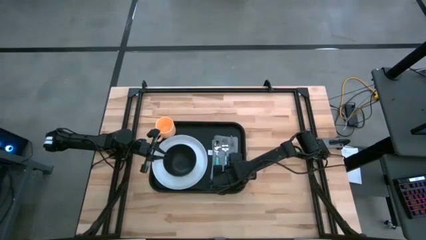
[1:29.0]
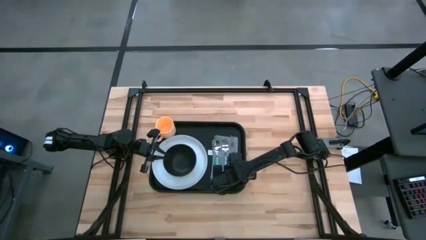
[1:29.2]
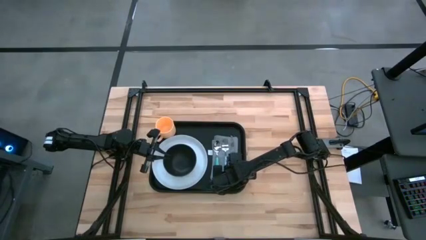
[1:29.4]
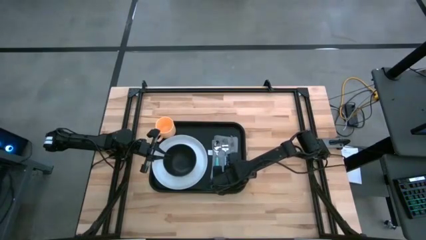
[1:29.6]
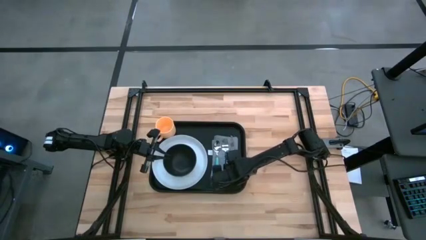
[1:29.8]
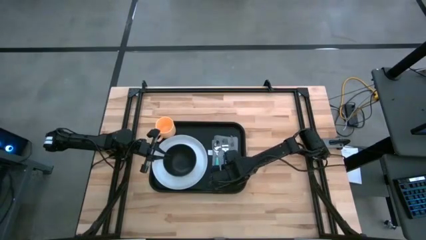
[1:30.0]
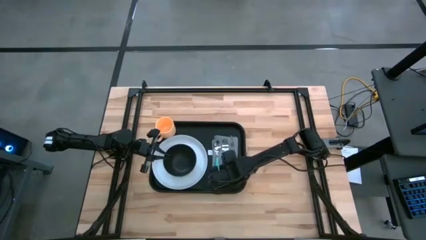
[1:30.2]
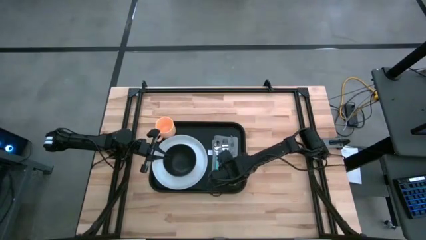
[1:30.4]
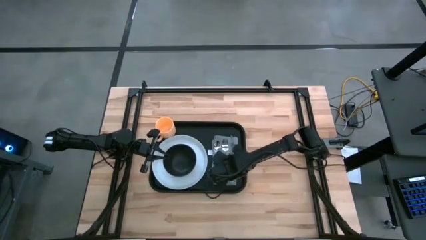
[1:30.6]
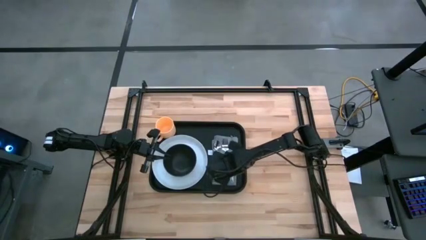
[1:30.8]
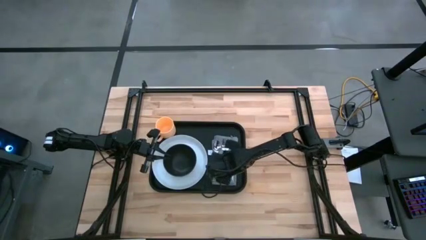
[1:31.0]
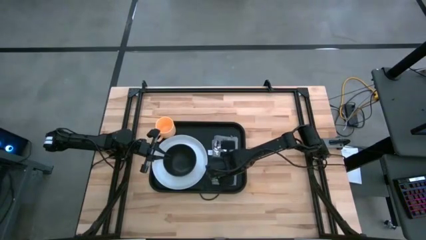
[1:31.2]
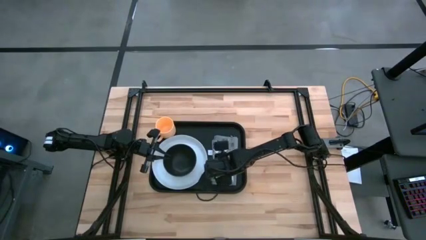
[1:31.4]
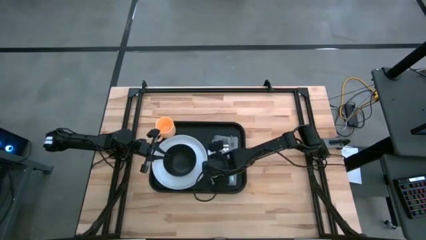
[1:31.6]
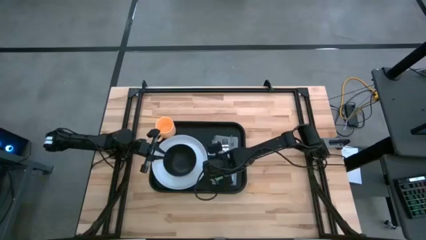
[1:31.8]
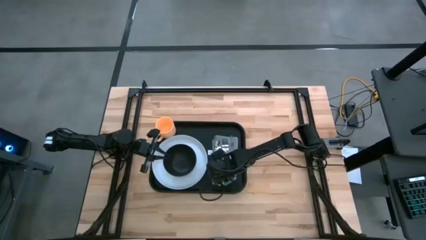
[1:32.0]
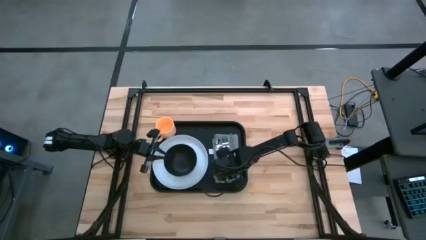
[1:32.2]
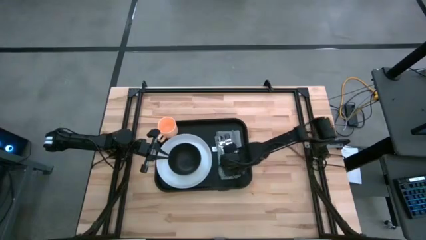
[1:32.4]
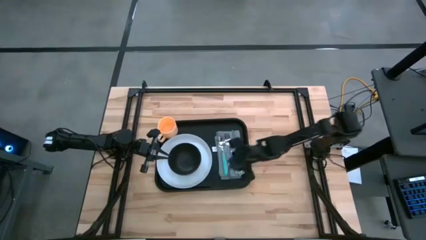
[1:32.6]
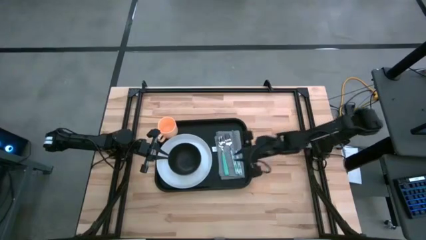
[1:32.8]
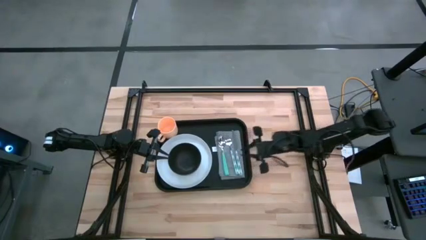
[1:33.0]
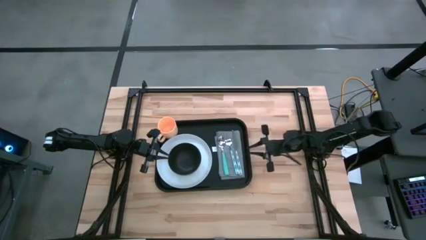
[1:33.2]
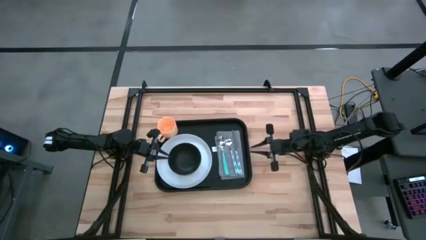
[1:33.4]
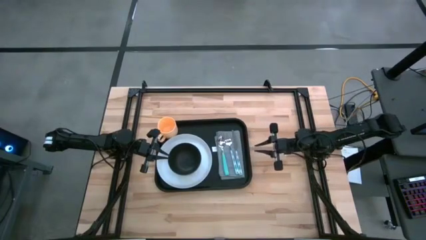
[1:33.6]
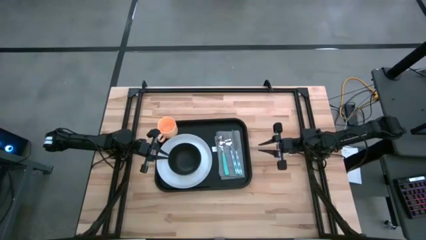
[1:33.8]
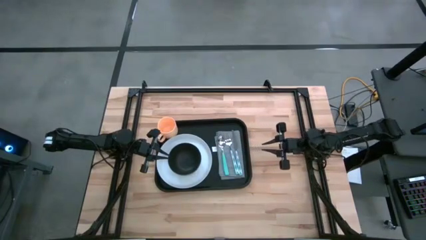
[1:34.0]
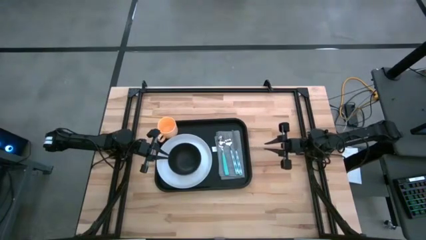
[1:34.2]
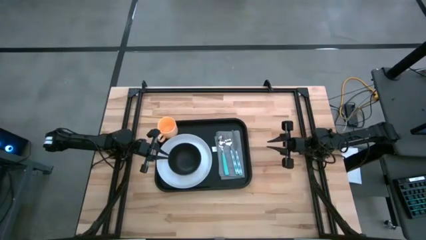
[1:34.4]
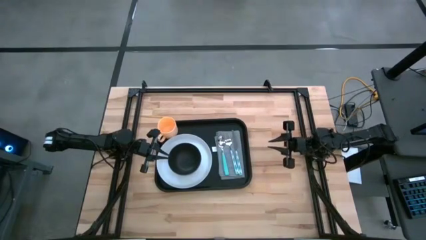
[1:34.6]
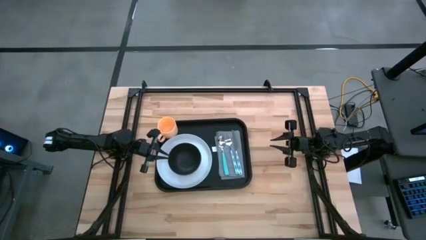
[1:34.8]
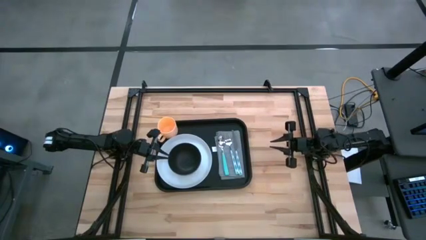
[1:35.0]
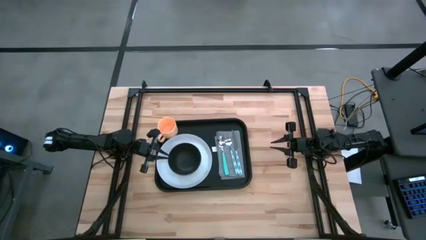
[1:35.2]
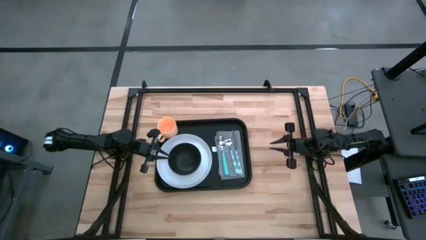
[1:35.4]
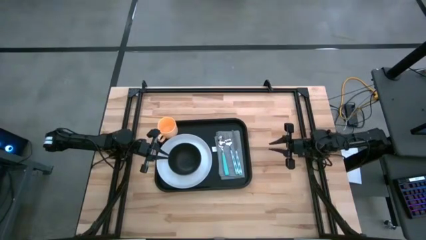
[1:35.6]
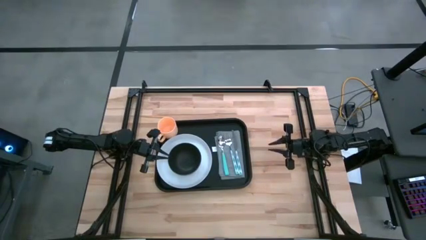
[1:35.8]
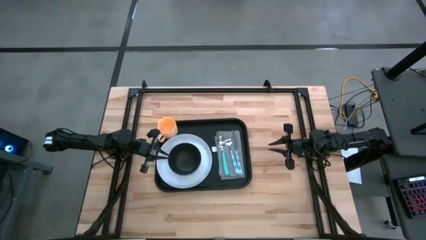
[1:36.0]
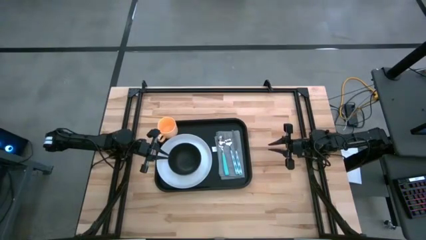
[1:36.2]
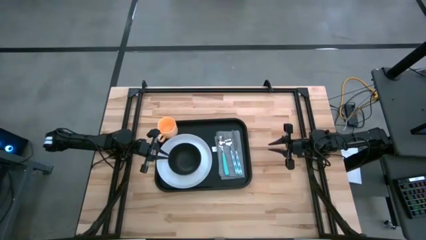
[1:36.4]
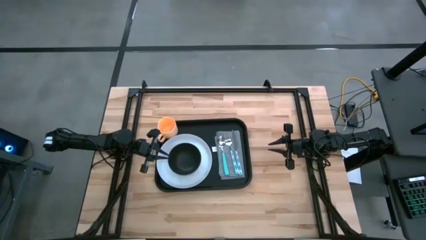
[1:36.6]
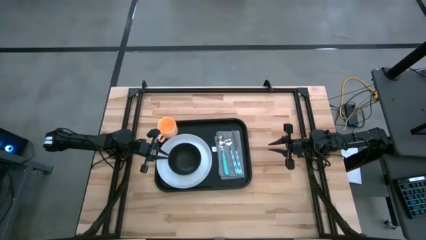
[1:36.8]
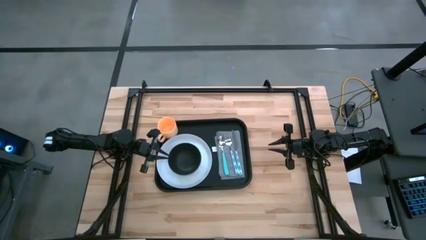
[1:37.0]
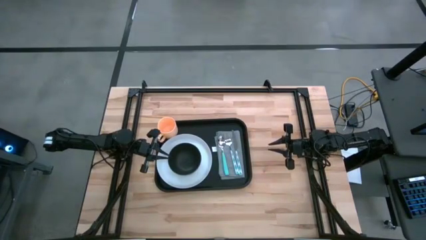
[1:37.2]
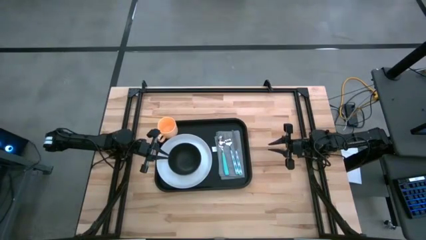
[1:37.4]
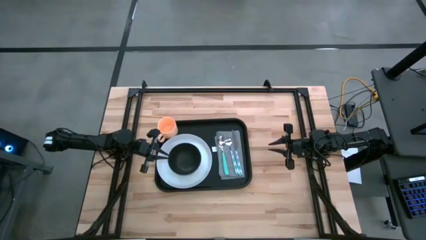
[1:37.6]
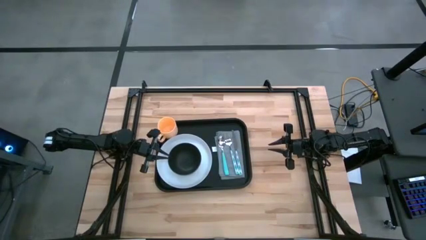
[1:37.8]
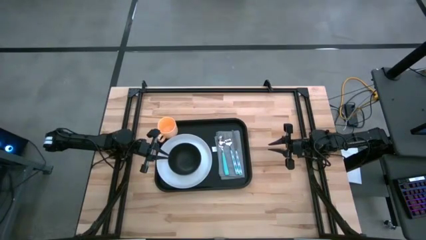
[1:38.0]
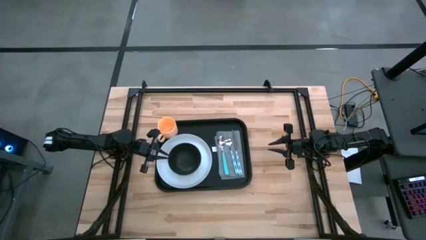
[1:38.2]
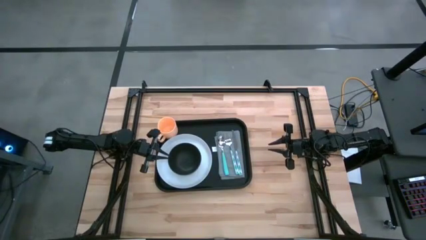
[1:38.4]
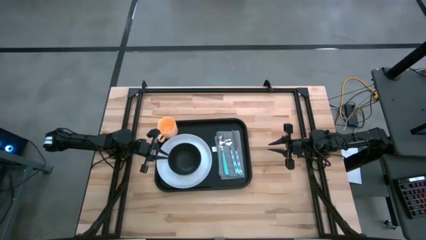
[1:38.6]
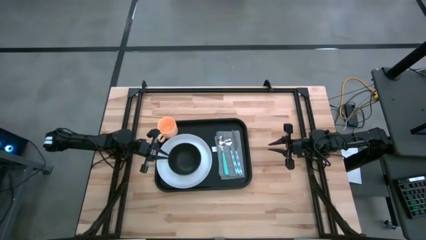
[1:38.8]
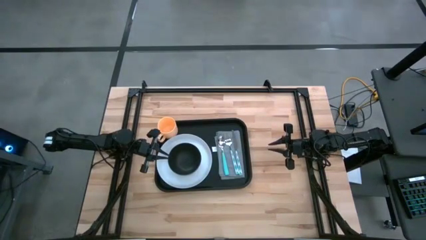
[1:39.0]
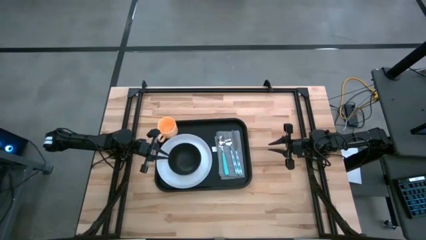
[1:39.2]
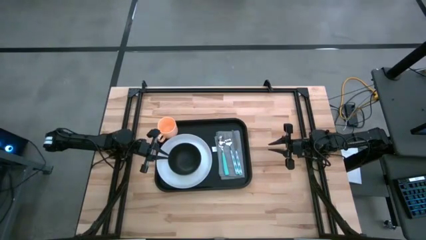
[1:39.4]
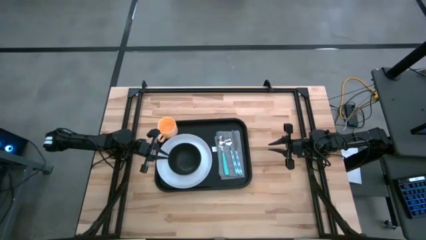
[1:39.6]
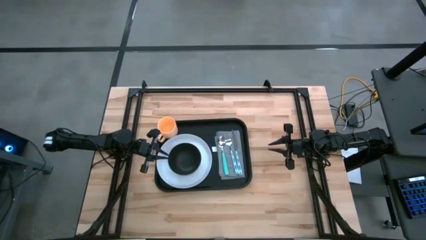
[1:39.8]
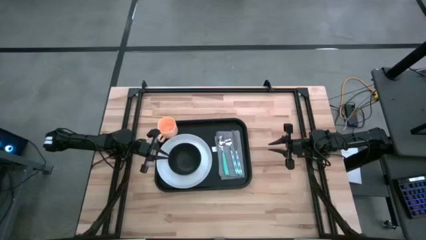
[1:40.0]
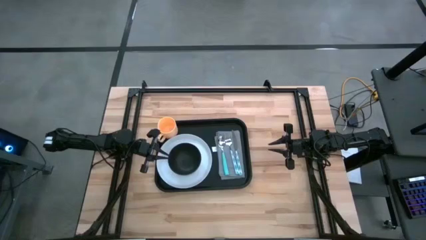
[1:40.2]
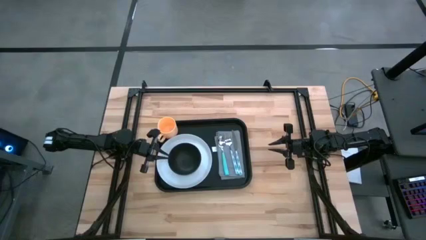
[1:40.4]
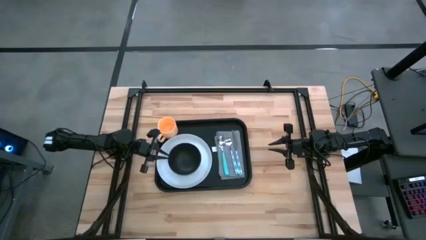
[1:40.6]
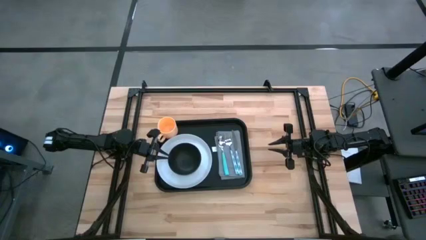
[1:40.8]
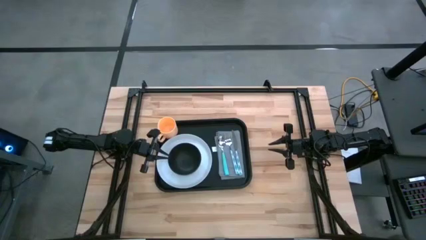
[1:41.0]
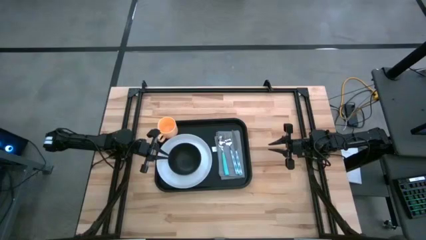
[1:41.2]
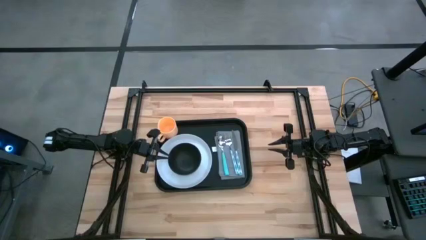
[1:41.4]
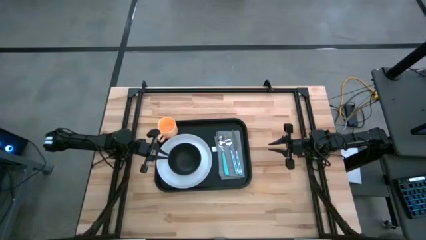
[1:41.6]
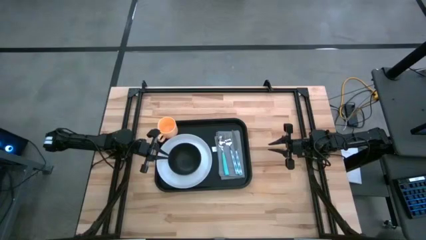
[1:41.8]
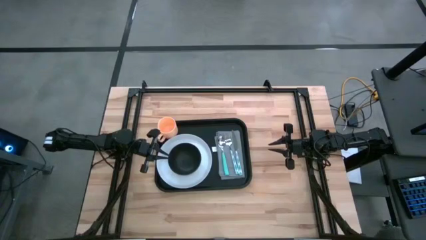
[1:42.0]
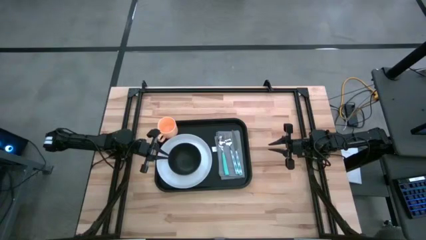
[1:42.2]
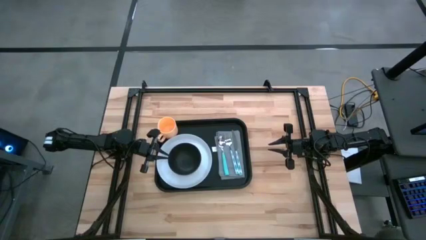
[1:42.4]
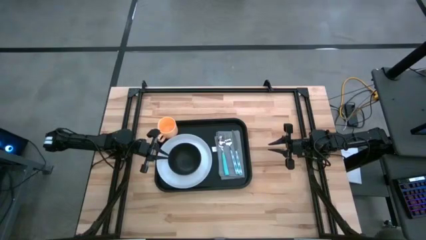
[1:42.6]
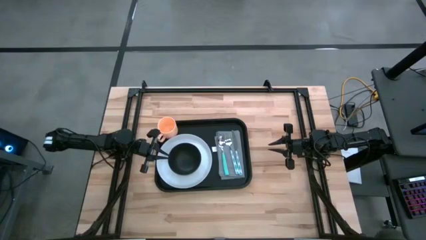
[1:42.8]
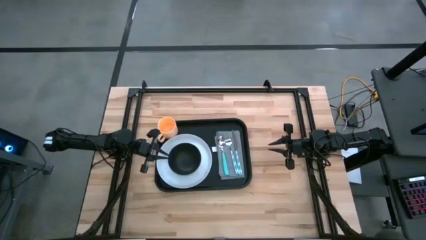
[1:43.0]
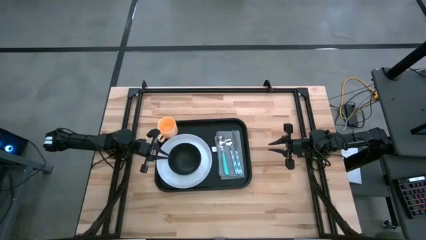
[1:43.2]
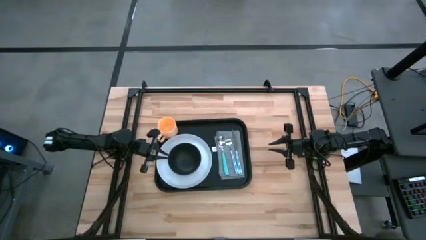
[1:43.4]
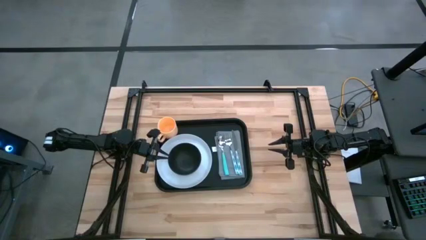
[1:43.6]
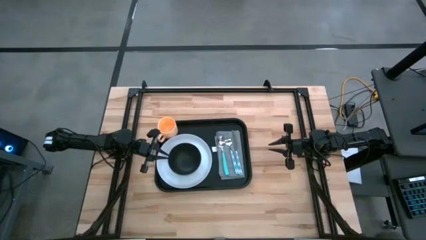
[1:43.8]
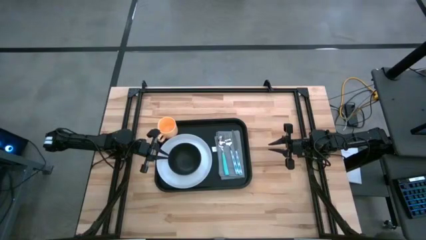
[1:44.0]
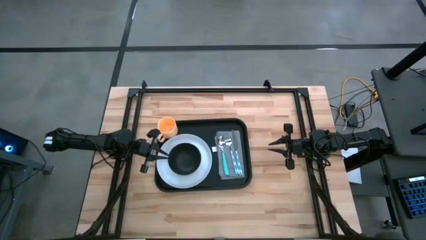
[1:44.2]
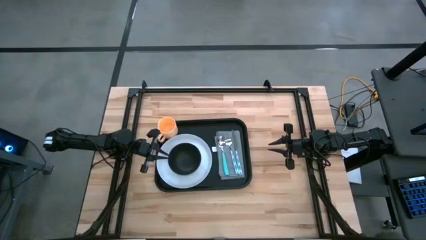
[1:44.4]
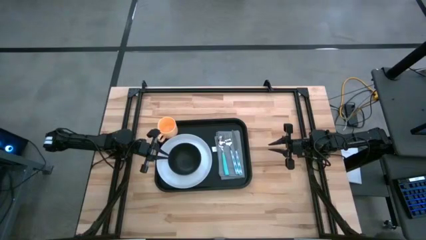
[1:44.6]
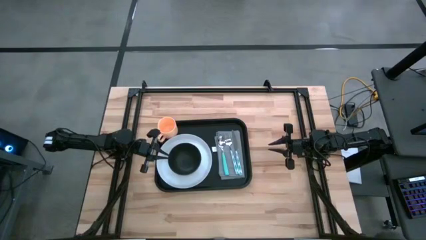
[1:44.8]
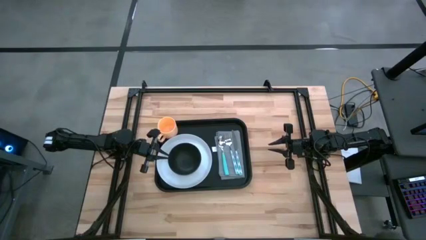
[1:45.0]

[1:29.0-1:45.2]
Task: Set up tray
Return to Home Position
